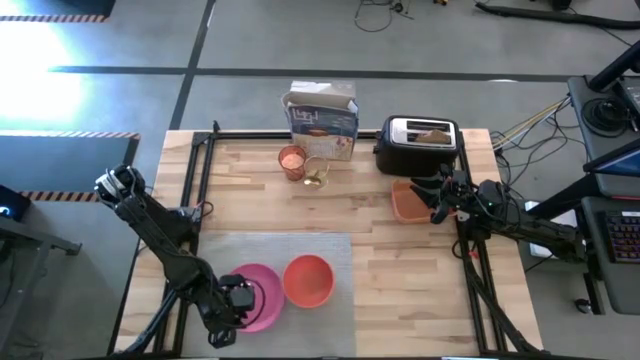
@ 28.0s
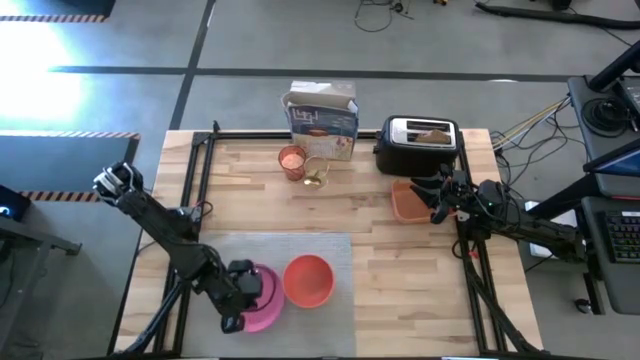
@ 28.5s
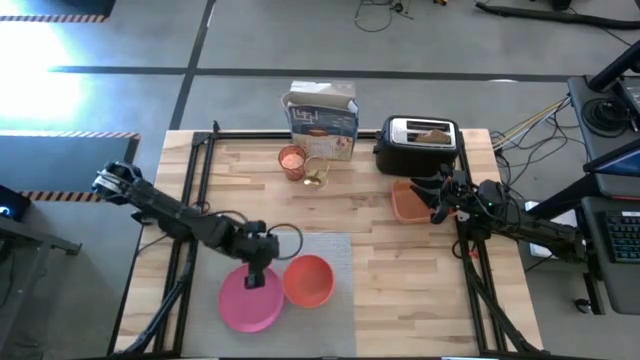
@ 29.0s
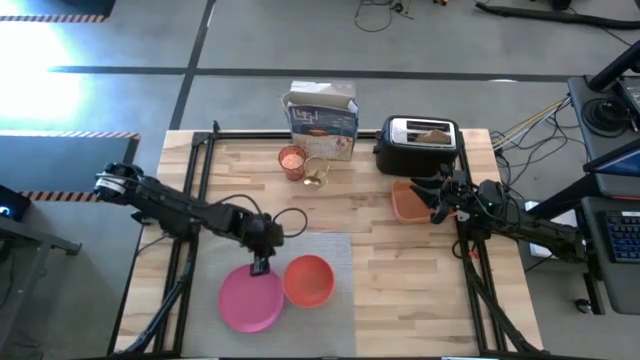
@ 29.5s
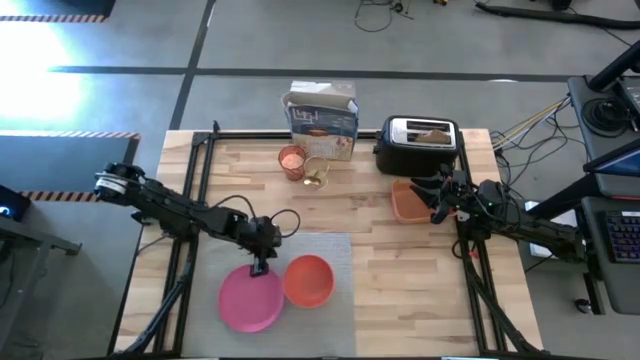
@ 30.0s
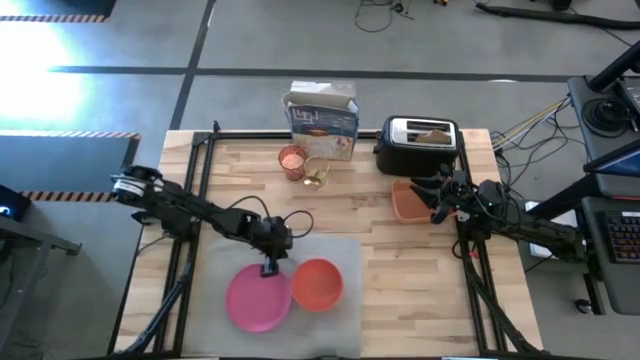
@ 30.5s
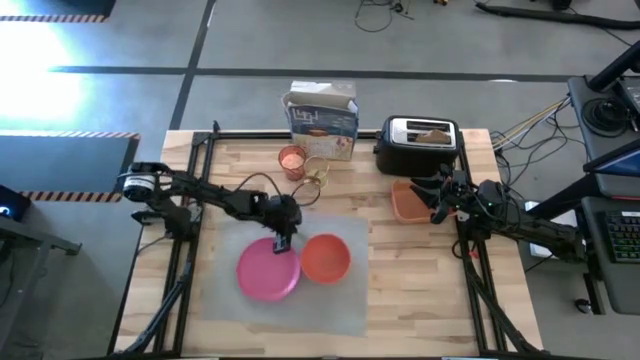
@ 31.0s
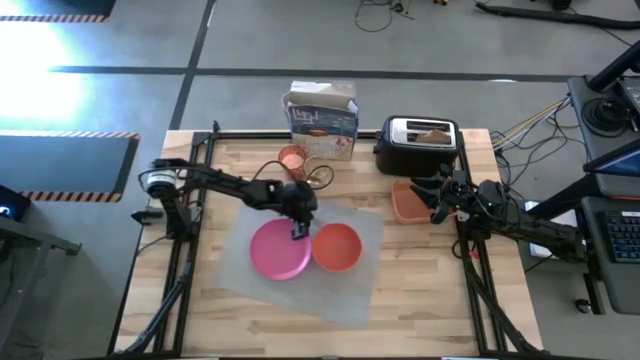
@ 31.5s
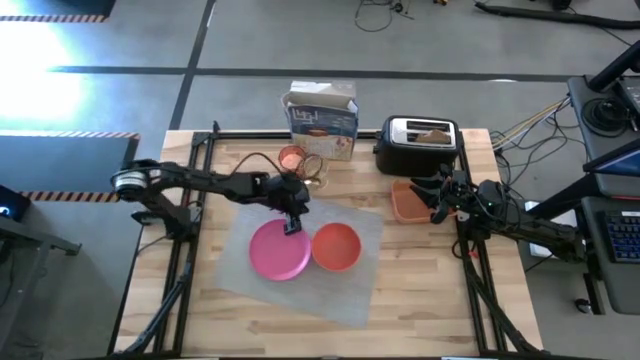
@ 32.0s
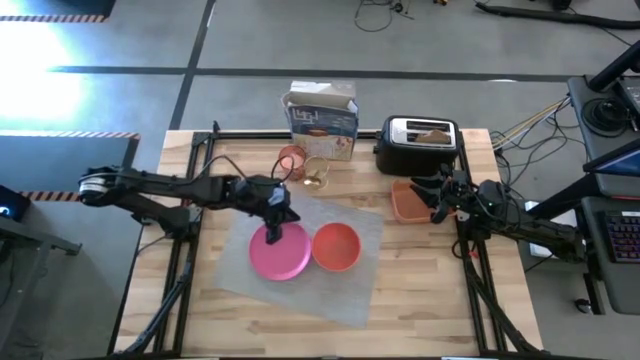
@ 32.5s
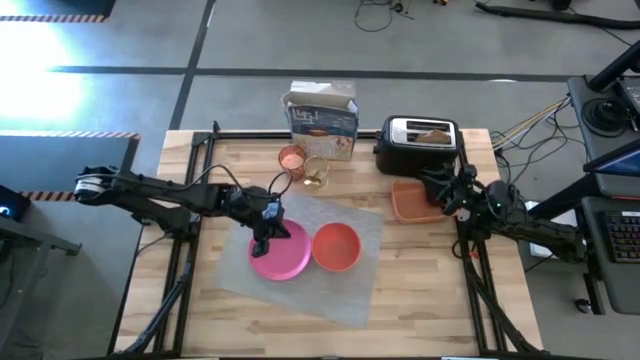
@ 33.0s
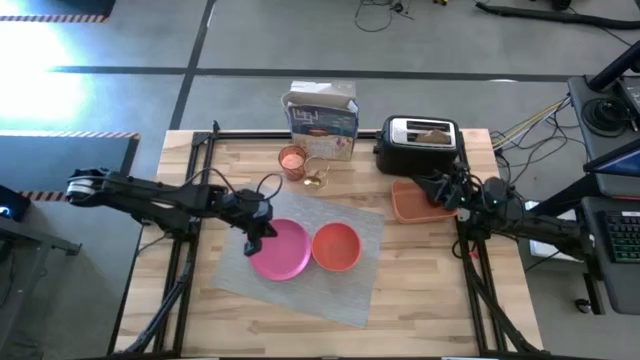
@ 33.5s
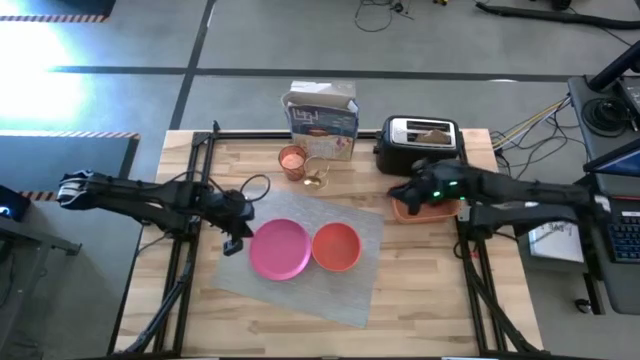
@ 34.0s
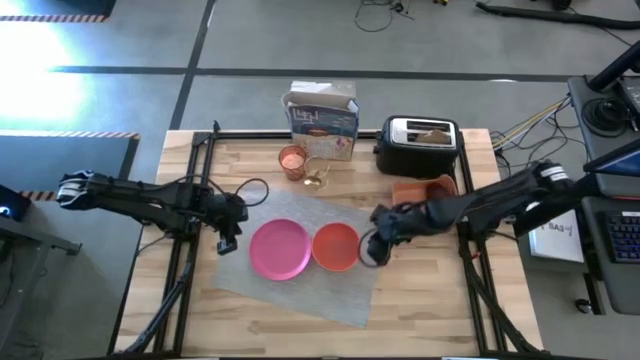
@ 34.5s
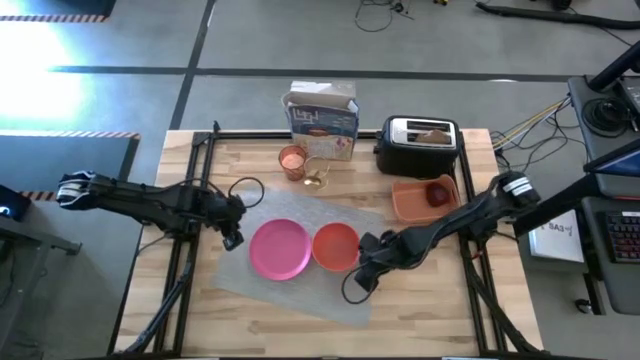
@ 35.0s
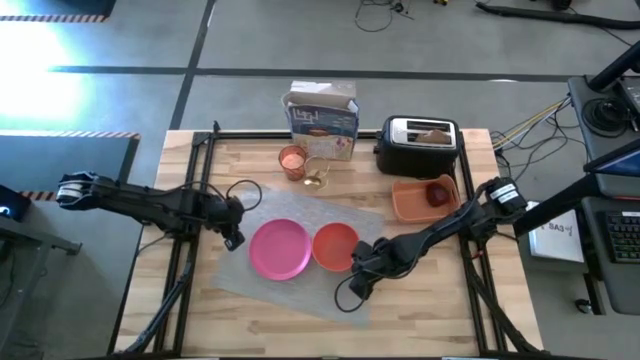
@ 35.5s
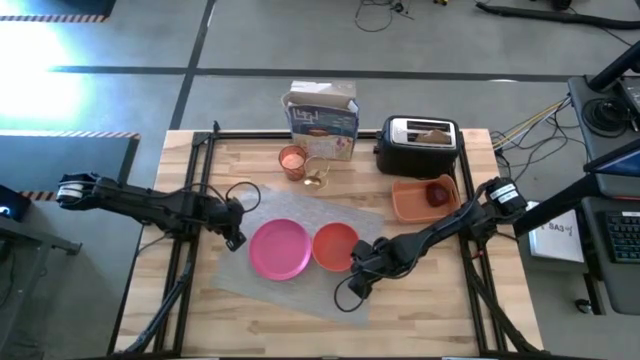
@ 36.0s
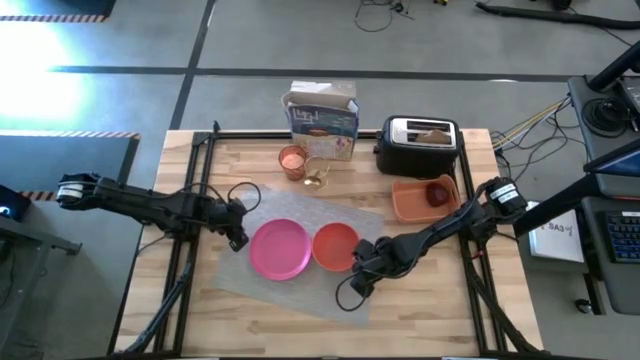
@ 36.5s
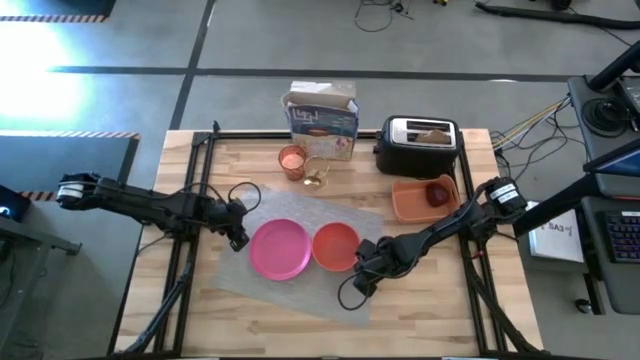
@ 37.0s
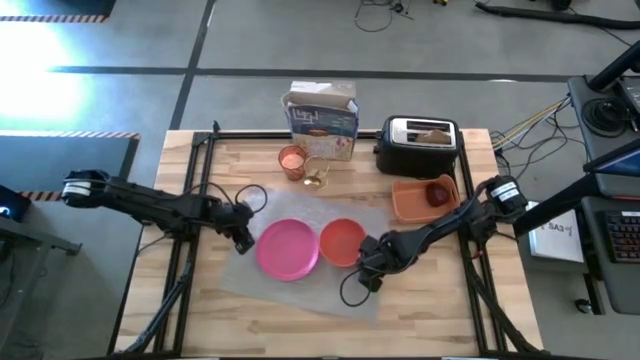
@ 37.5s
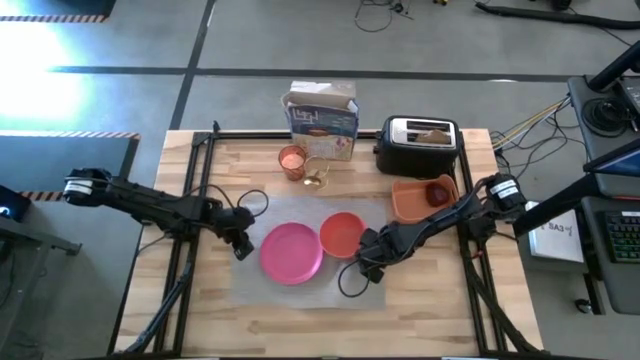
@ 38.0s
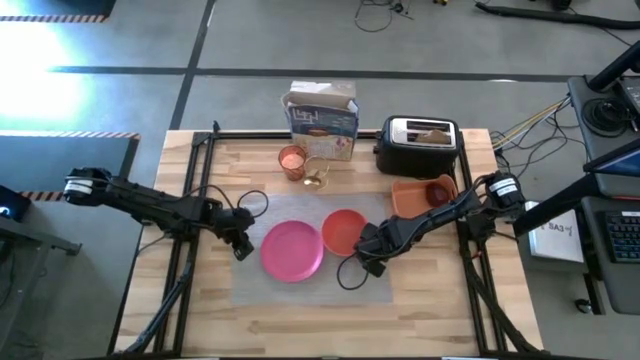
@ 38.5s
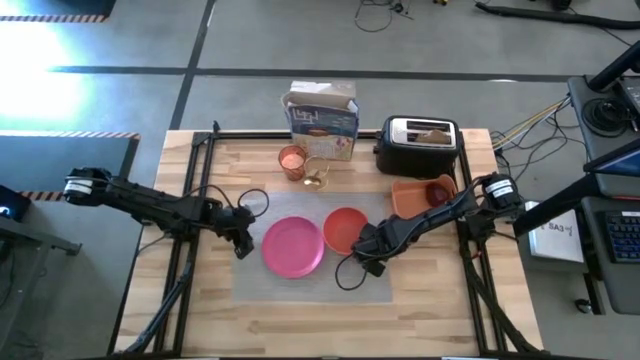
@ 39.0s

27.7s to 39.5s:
Task: Arrange a breakfast setting
Move the table mat to the center of the table

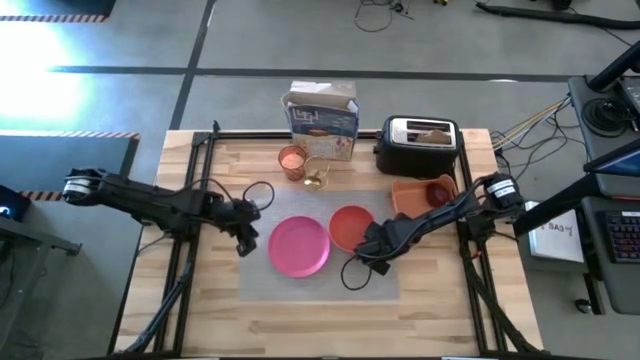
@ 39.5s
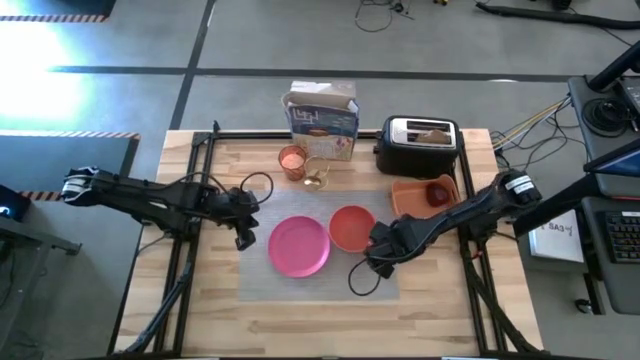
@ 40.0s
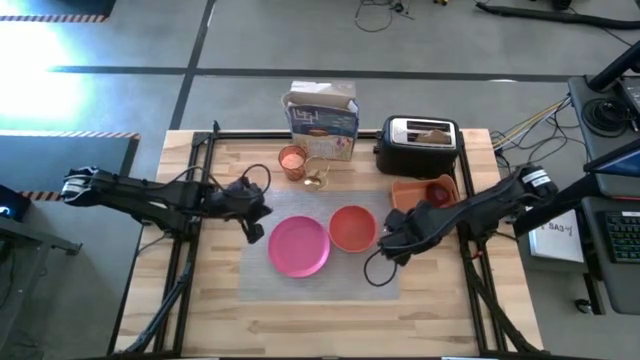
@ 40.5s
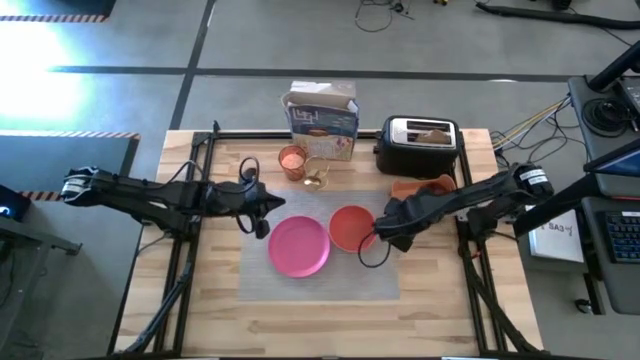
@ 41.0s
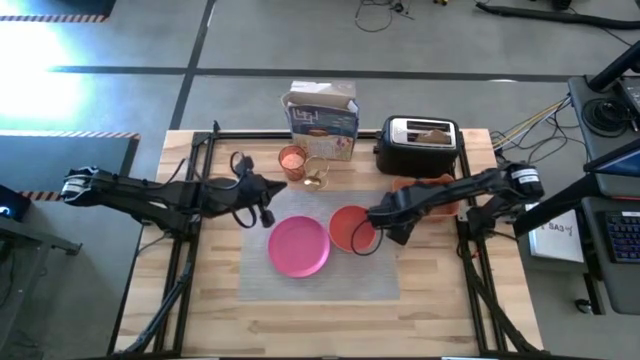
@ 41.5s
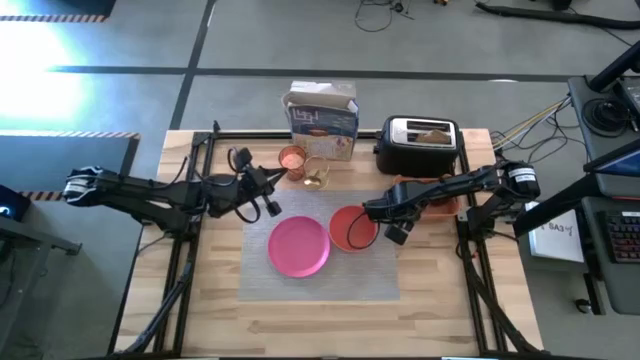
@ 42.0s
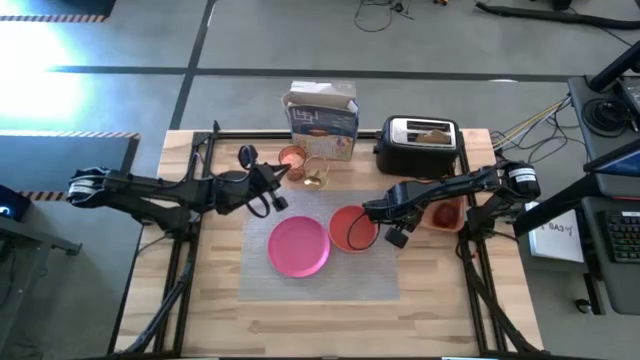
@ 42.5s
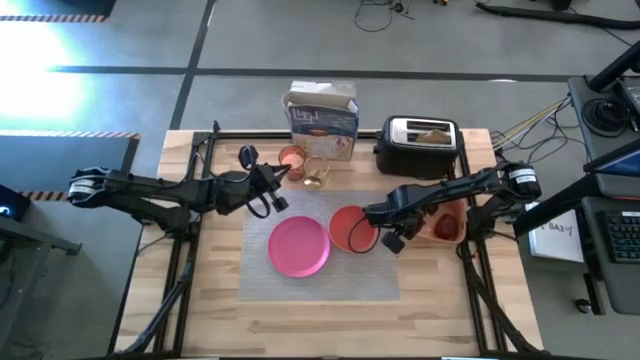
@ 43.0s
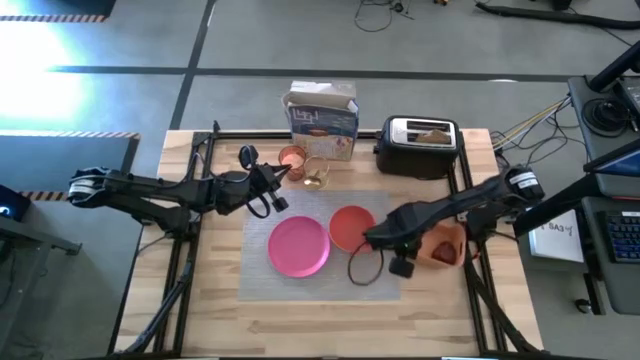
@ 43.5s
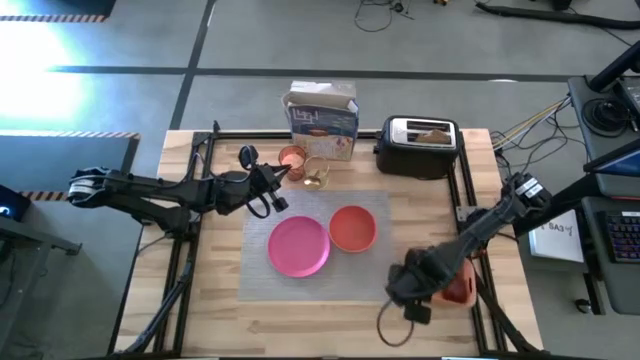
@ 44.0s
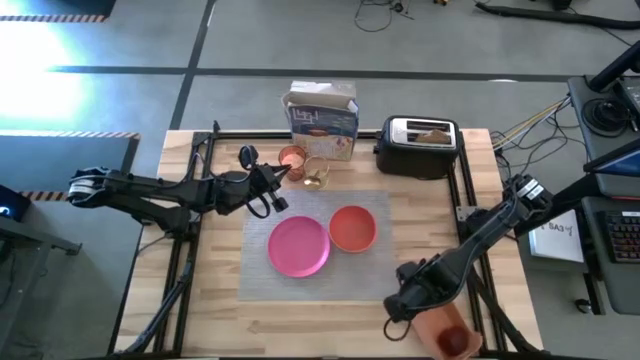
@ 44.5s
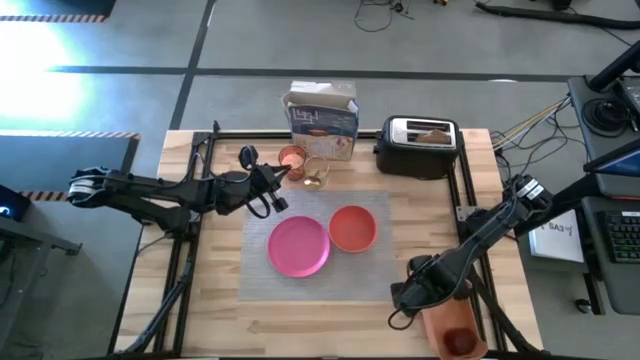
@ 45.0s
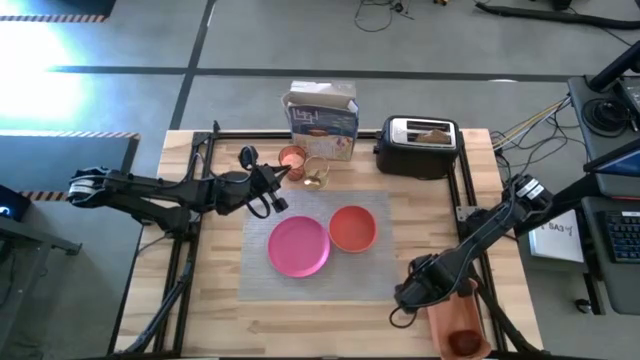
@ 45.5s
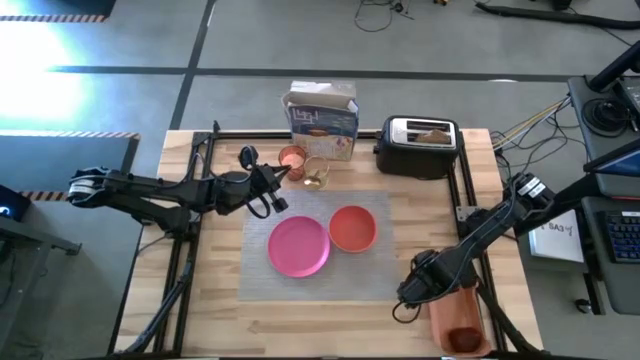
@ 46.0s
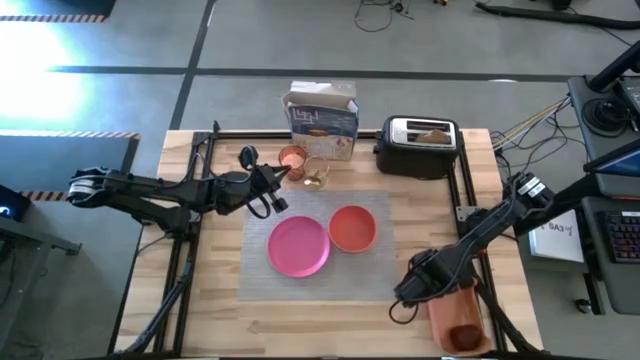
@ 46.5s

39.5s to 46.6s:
Move the orange bin to the bottom right of the table
